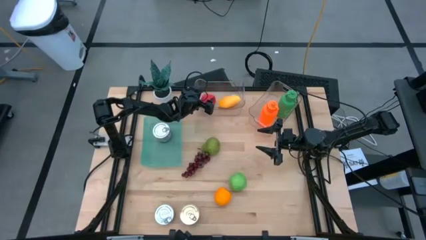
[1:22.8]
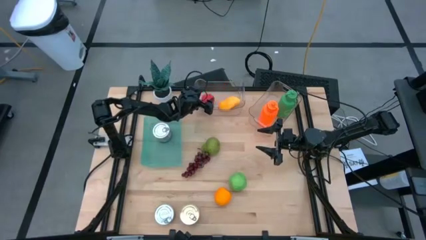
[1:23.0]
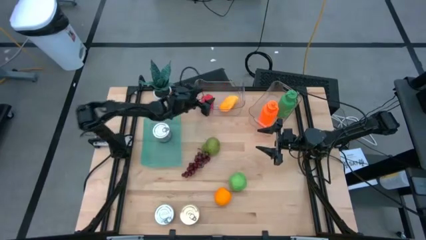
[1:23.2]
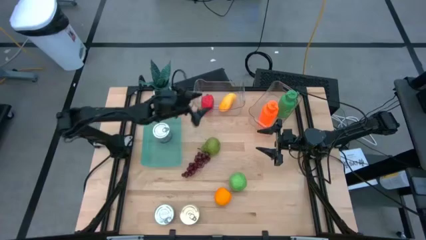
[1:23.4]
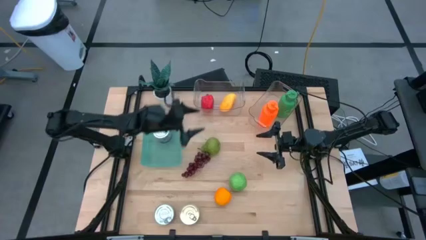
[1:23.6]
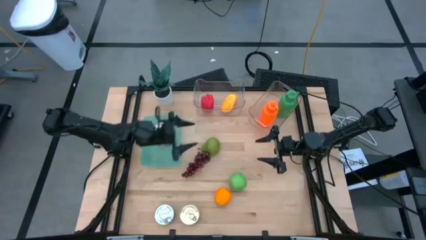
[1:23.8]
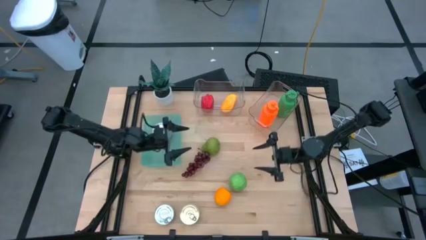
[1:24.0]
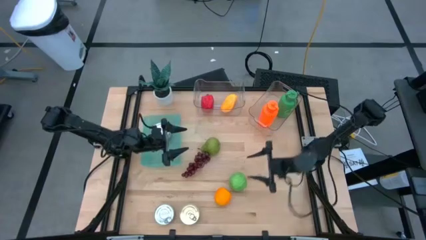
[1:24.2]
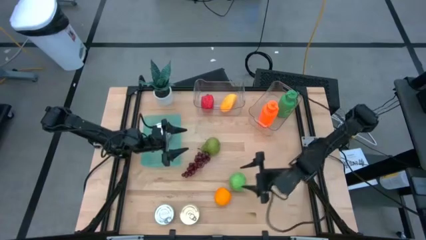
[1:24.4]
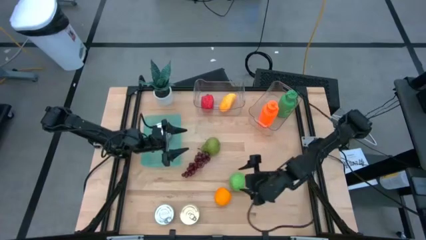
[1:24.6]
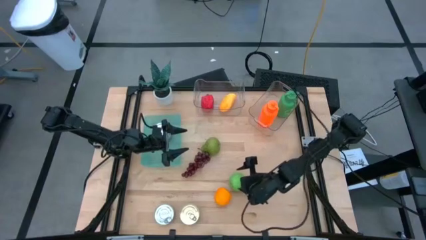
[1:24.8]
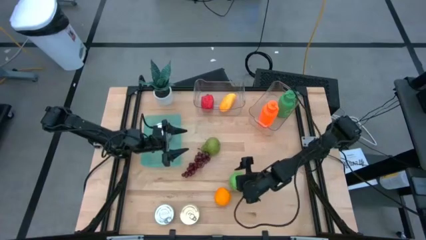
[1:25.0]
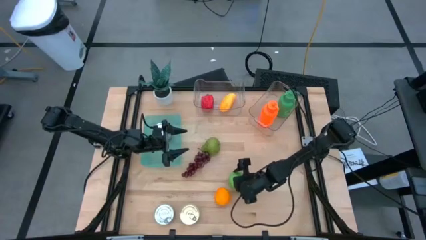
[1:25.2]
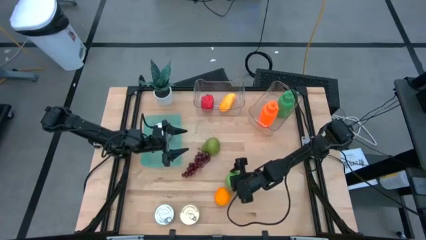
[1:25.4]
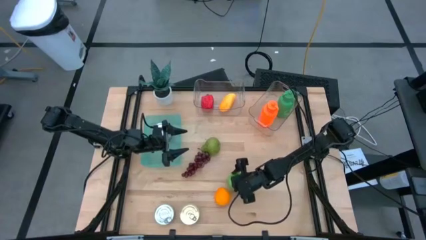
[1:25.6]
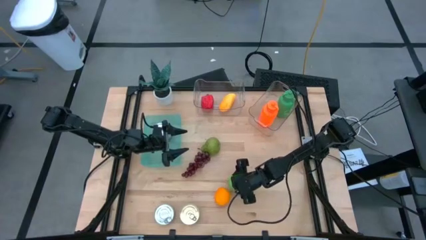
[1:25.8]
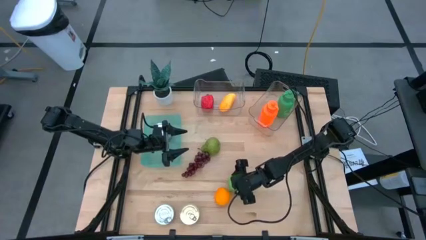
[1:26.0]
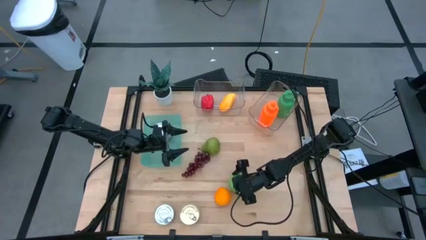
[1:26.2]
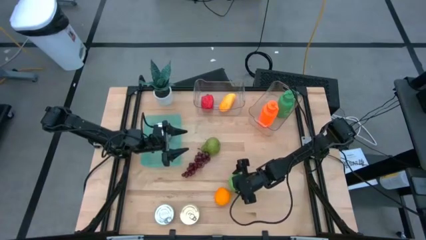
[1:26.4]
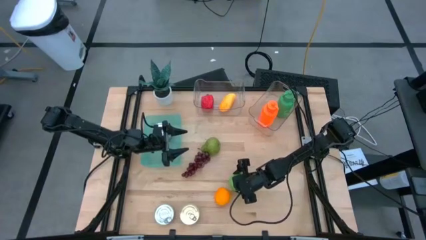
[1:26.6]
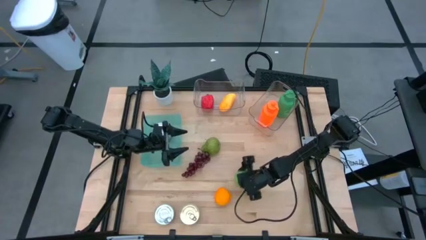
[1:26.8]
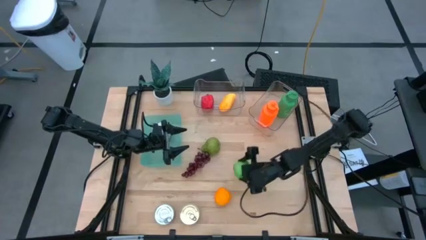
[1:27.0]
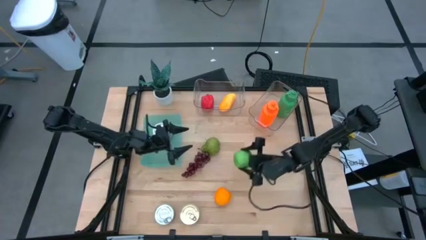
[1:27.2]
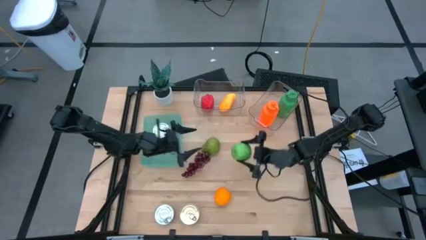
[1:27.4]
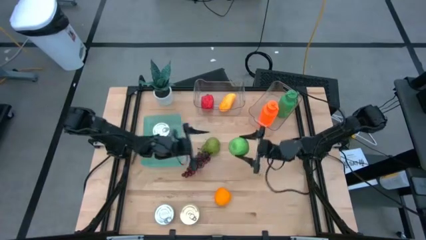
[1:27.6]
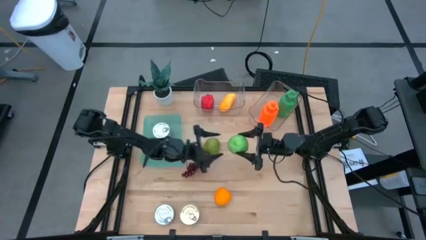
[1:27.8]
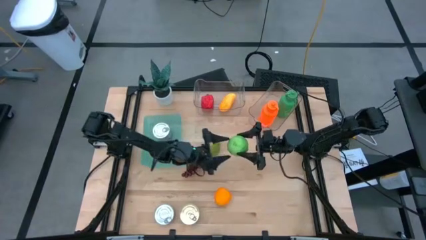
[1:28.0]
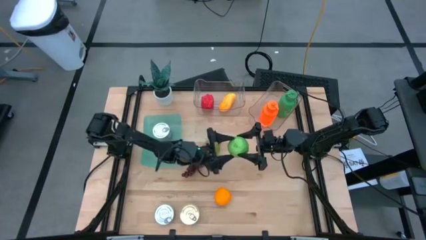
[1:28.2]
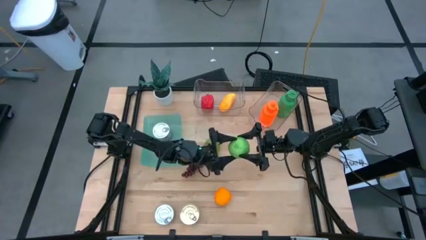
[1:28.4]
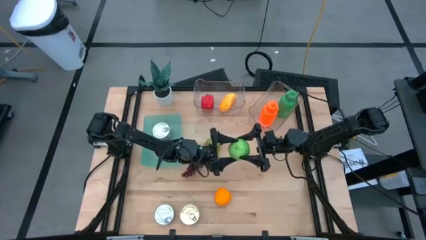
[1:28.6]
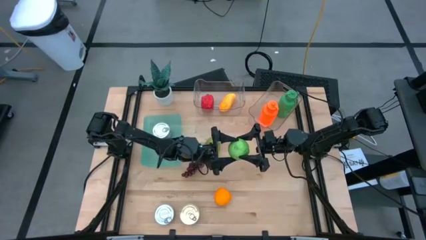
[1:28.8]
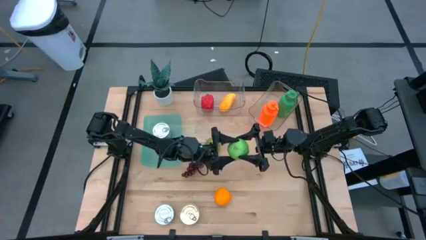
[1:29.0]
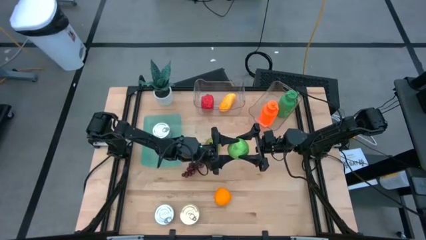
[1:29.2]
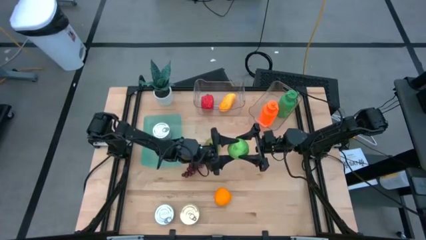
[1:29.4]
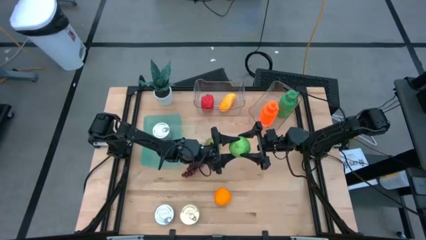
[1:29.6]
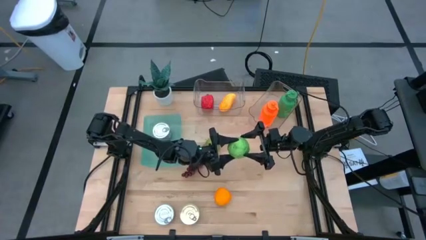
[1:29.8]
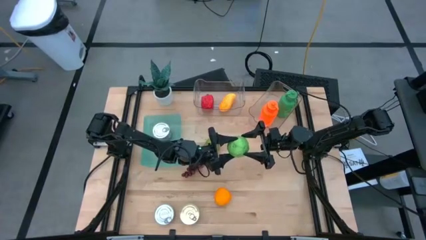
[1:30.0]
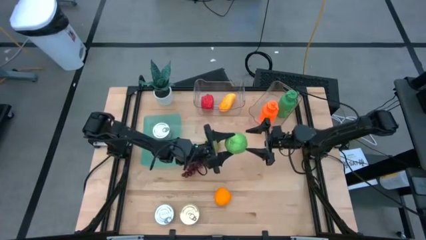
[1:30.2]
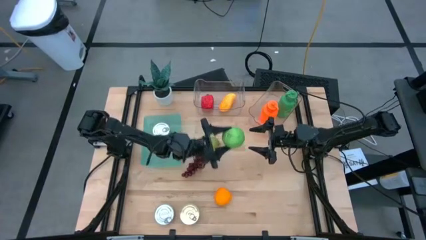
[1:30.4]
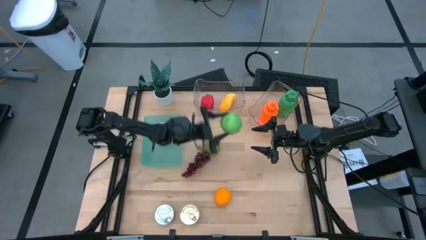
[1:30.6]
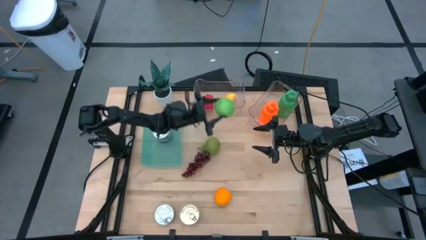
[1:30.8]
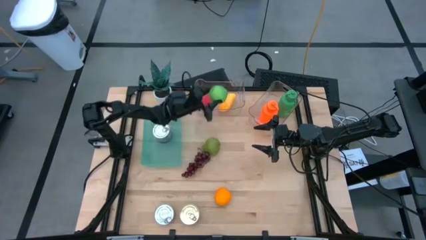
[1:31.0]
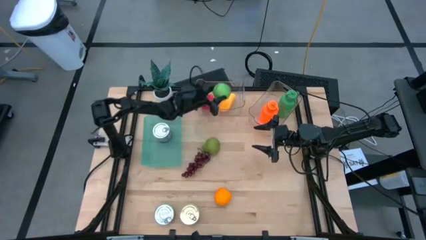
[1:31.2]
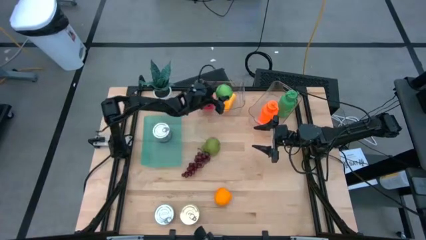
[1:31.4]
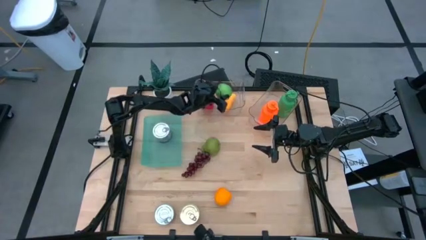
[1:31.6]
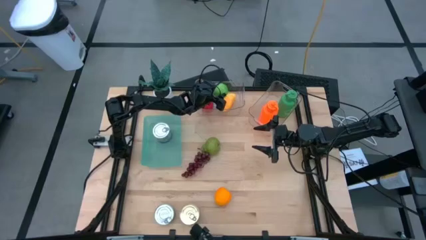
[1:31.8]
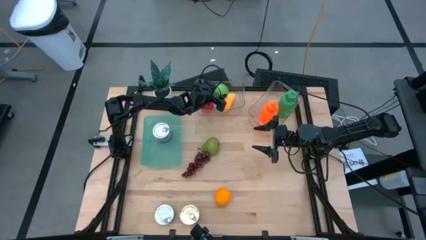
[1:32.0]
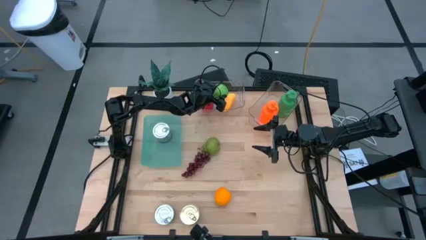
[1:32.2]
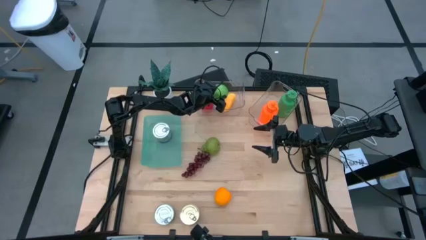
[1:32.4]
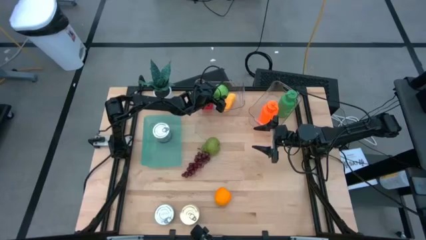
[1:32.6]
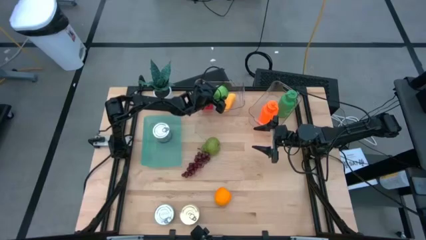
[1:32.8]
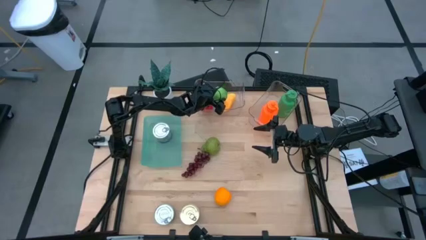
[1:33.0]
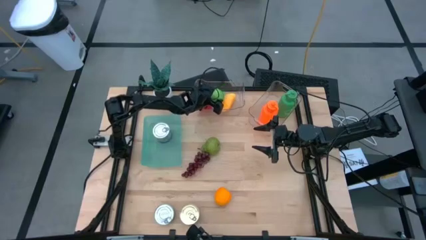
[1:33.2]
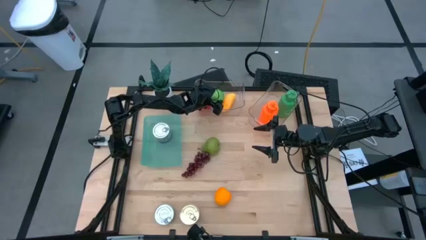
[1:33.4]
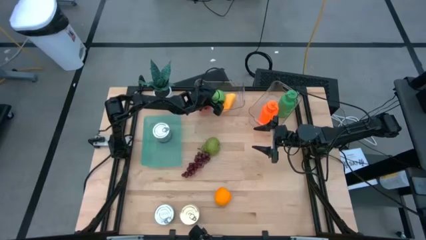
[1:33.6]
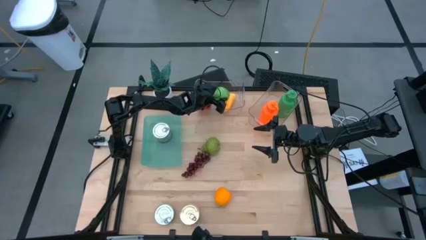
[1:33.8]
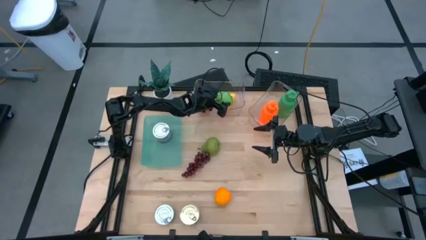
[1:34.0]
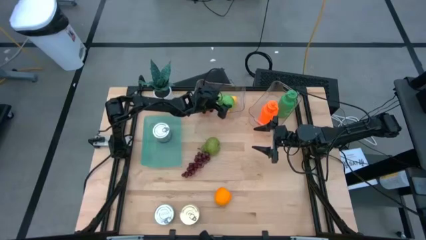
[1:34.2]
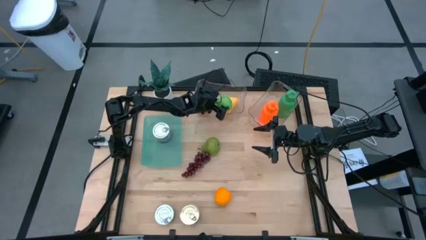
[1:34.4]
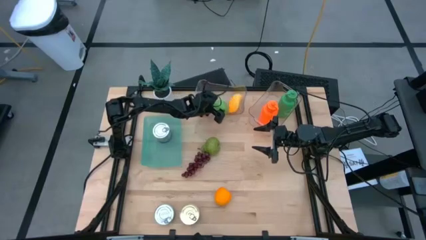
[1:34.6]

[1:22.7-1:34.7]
Task: Pick & Place Food Item
Put the green apple into the left transparent bin

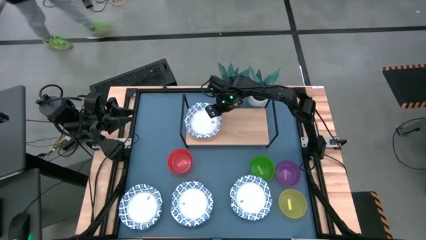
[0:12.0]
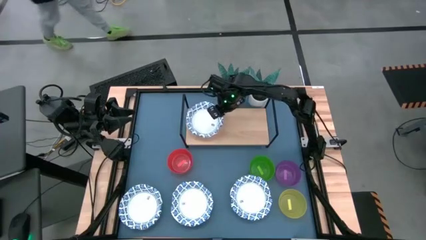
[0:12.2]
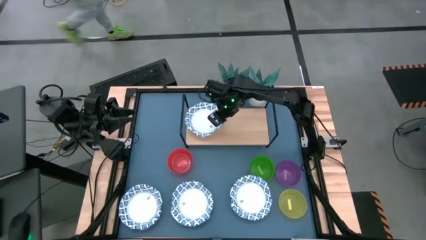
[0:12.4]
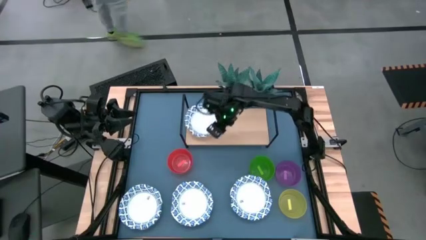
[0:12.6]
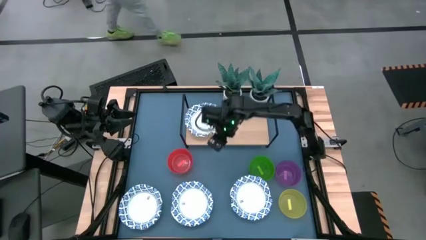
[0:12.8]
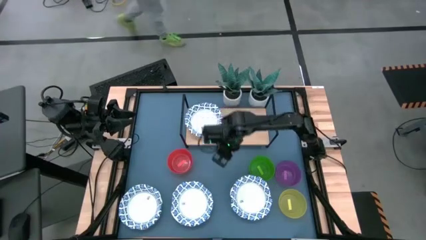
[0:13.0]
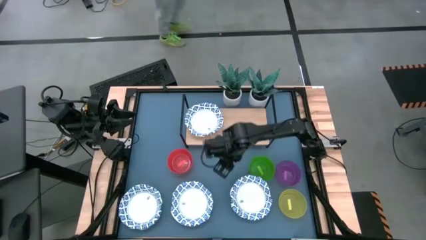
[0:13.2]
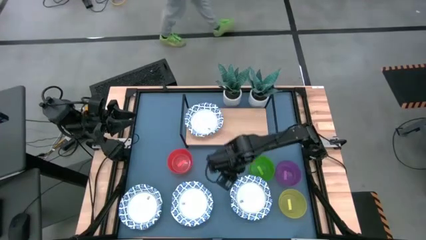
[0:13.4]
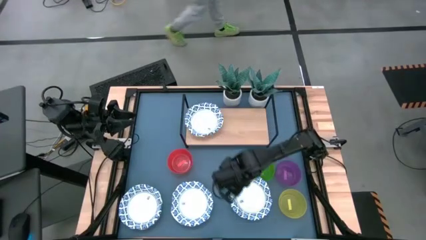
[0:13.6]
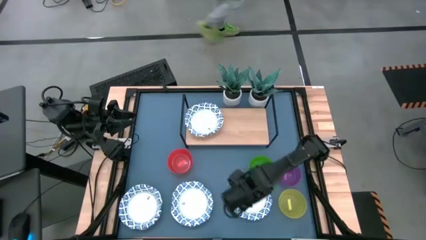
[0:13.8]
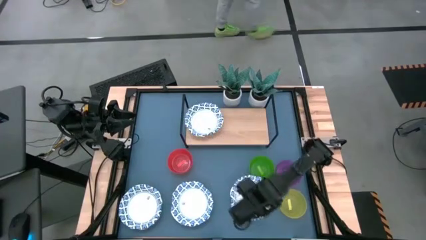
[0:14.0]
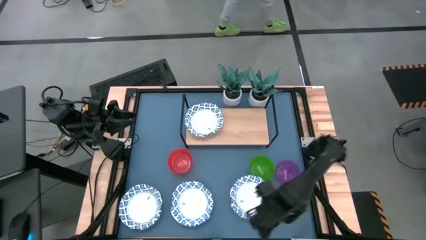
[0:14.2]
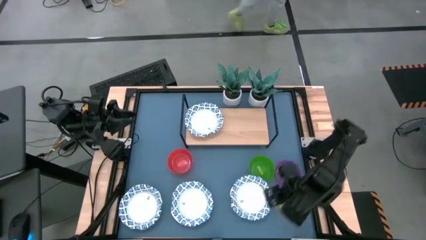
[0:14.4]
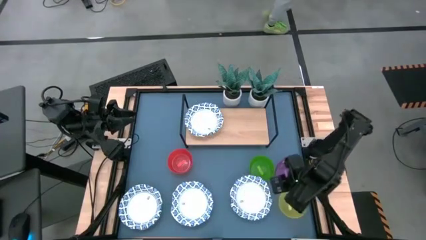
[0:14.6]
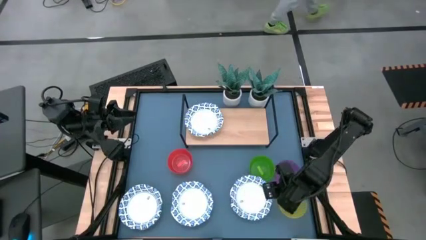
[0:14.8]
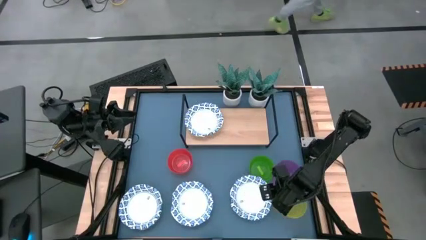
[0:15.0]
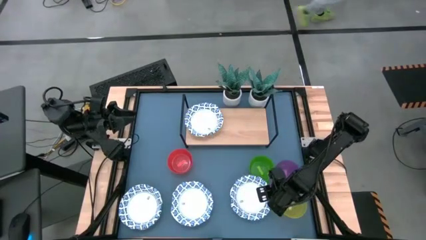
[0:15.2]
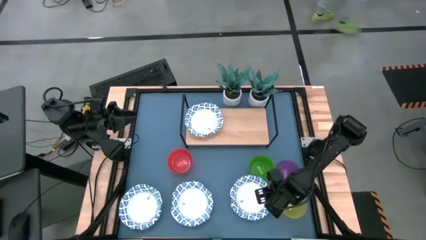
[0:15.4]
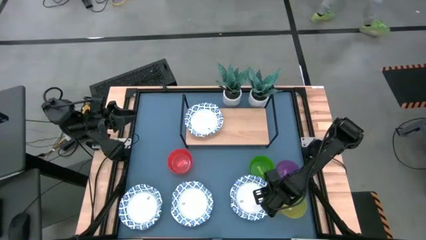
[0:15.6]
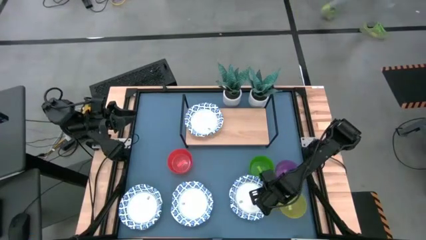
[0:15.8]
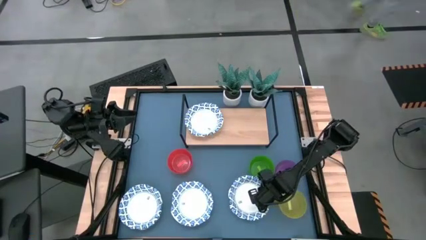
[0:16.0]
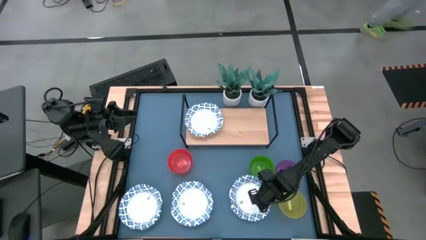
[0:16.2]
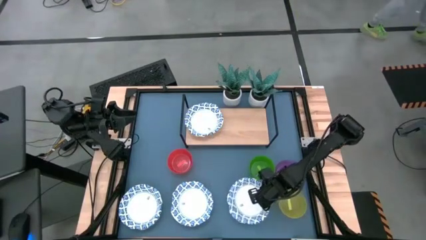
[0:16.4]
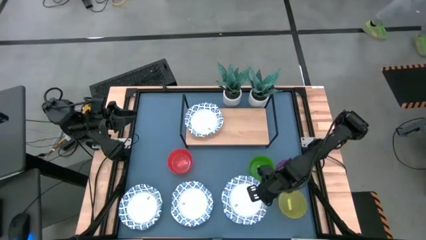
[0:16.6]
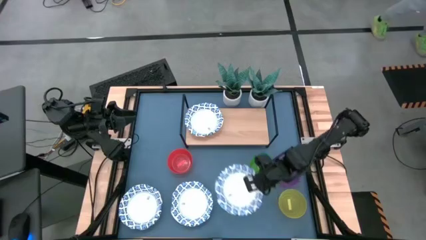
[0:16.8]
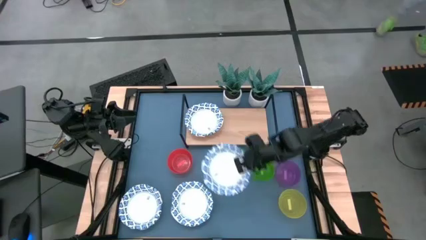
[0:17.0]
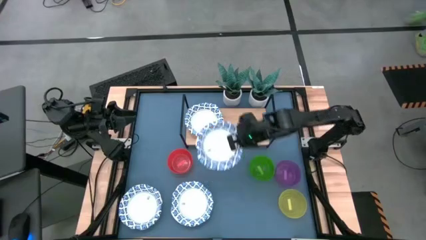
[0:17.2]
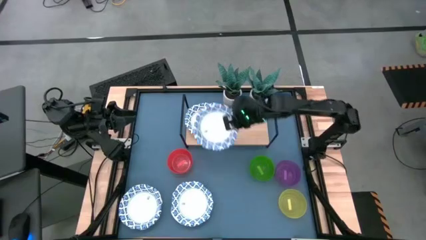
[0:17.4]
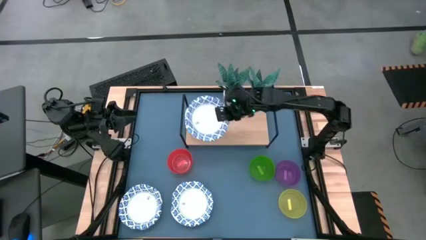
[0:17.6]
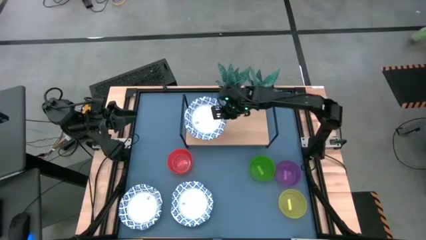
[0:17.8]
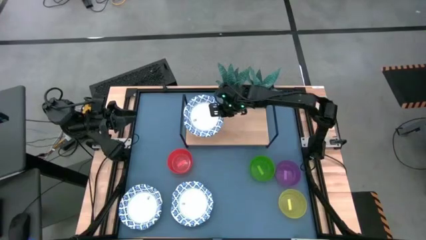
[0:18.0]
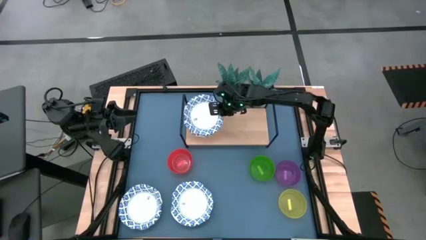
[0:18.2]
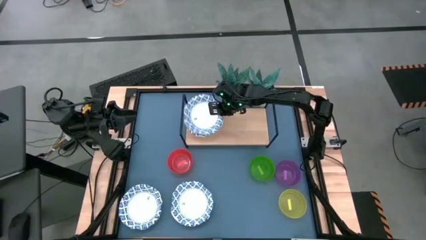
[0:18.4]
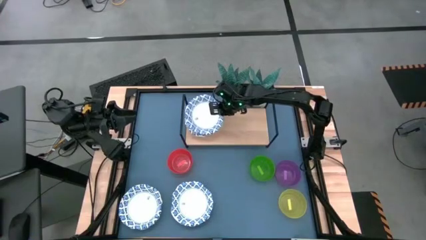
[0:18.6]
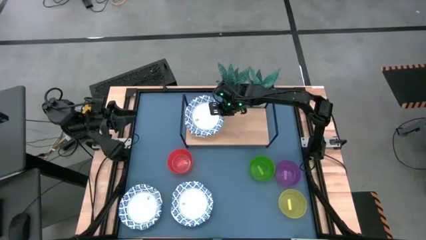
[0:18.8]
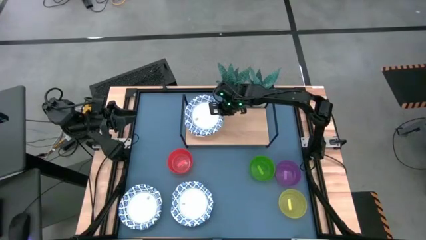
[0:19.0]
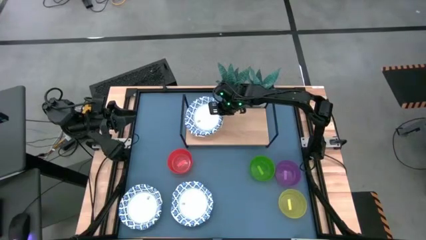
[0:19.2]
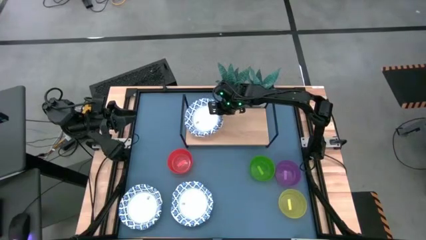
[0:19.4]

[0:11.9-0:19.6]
Task: Place and stack bowls onto a shelf
Stack the right white and blue plate on top of the other white and blue plate on the shelf
